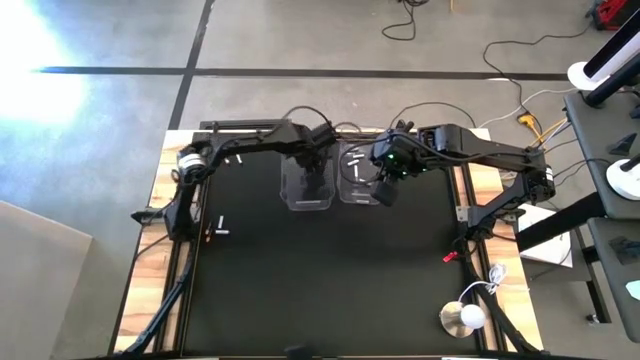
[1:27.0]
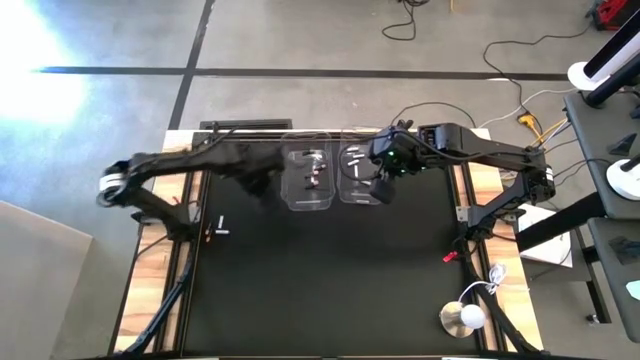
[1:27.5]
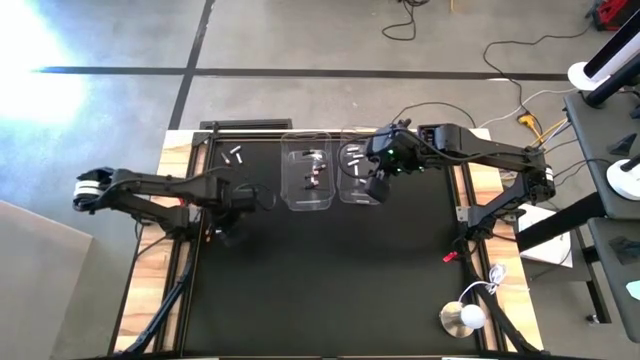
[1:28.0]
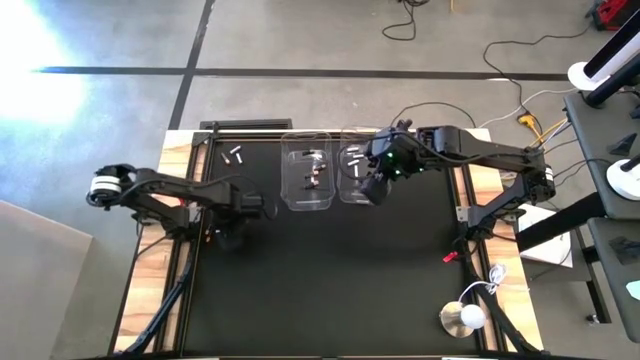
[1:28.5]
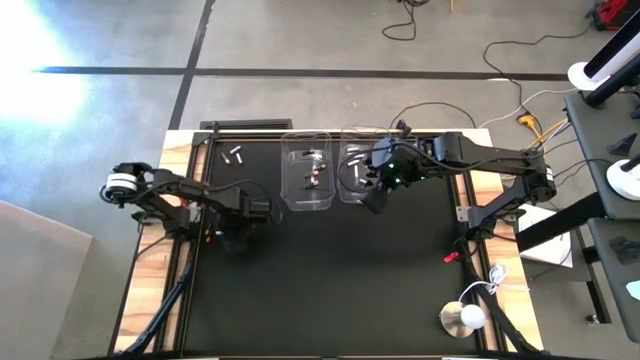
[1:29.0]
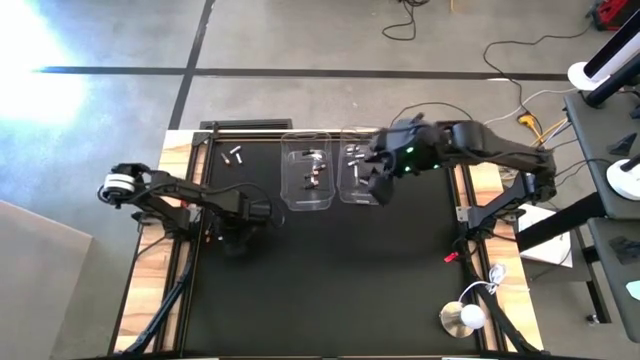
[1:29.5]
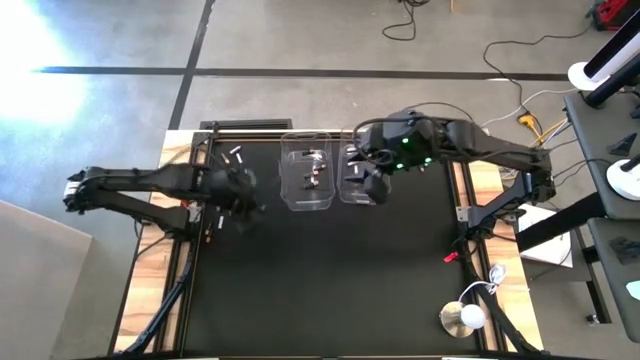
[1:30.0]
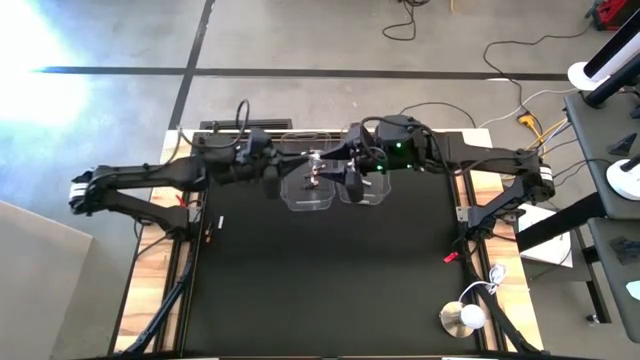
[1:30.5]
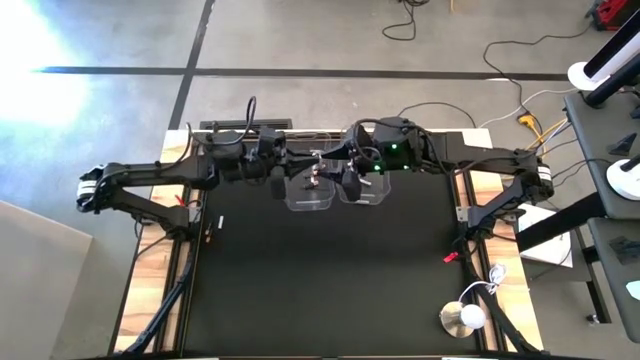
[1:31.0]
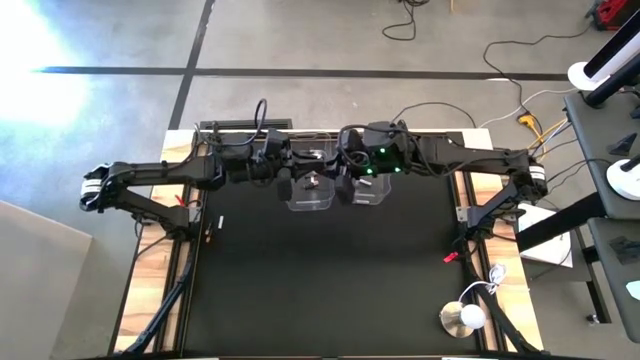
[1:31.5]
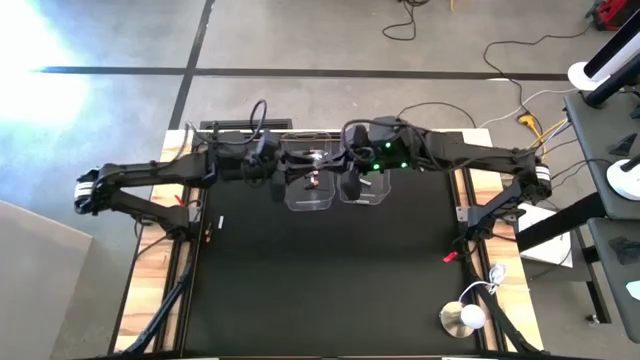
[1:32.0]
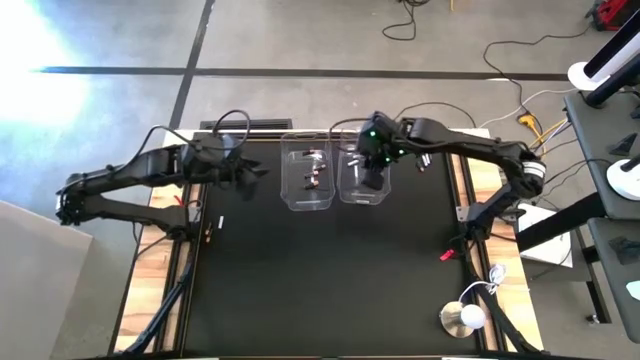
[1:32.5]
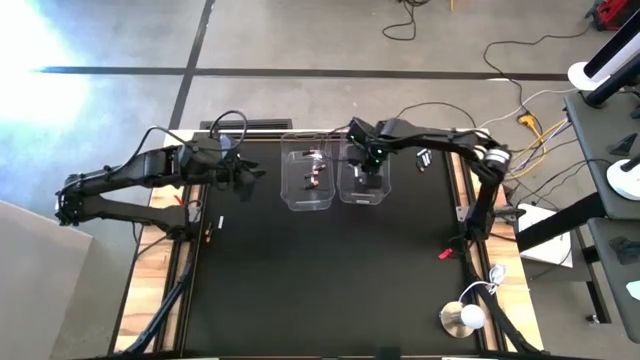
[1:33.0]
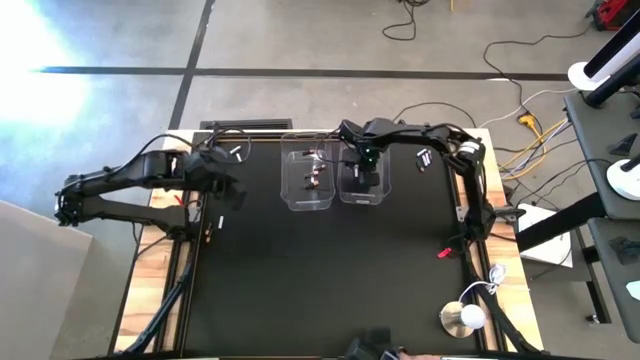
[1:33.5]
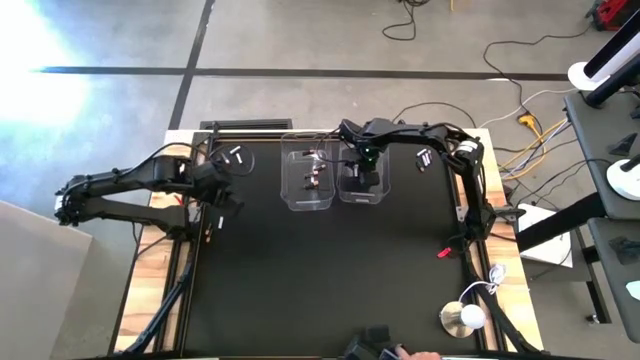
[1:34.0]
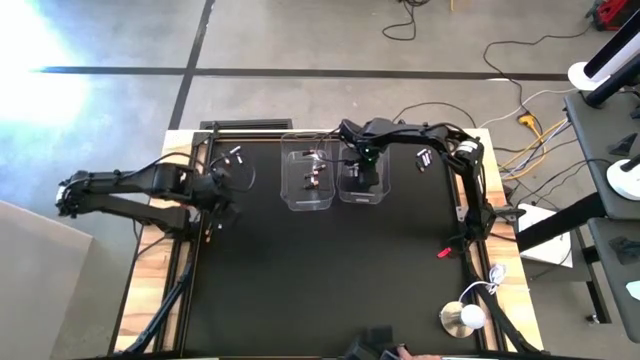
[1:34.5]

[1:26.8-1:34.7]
Task: Sort batteries
Put the white battery into the right transparent bin

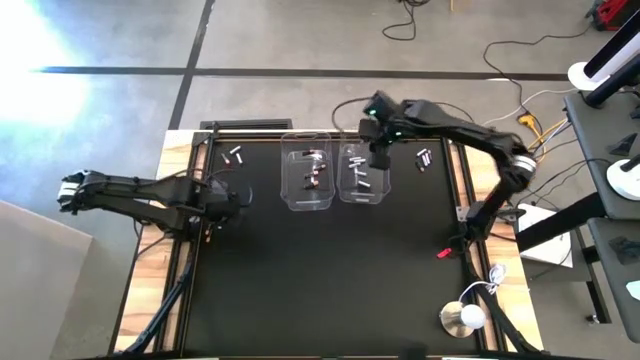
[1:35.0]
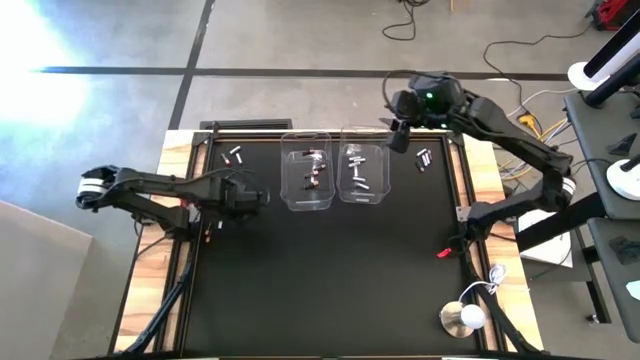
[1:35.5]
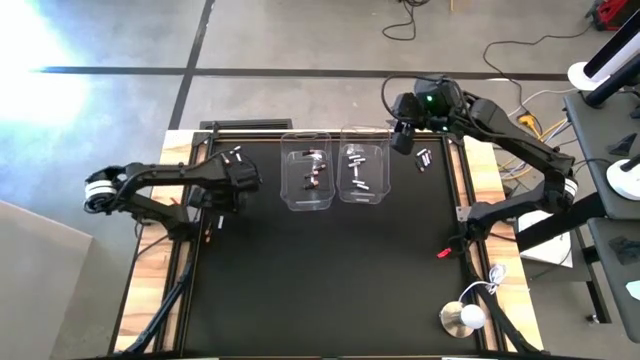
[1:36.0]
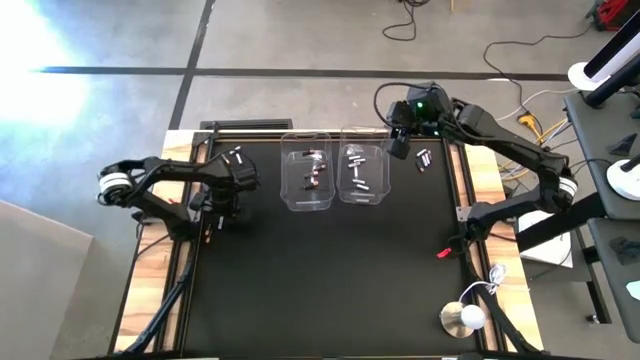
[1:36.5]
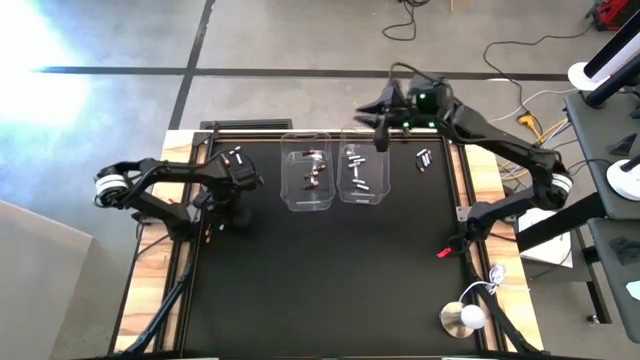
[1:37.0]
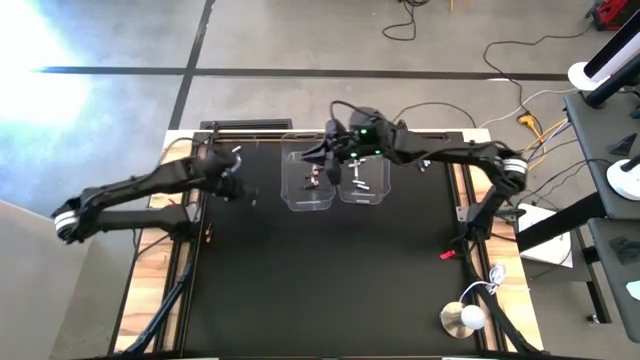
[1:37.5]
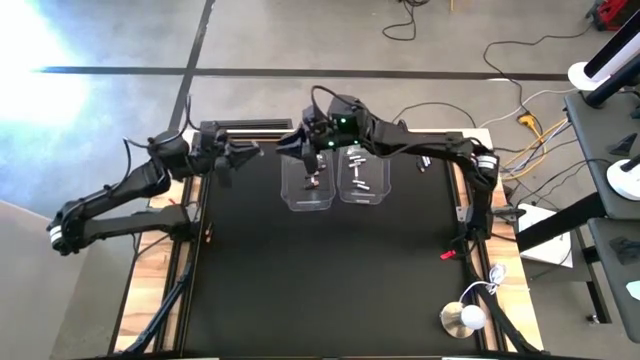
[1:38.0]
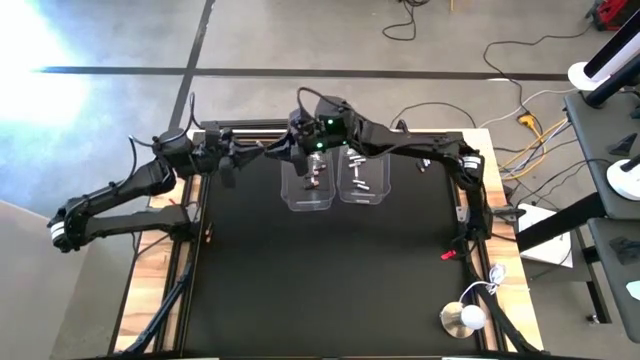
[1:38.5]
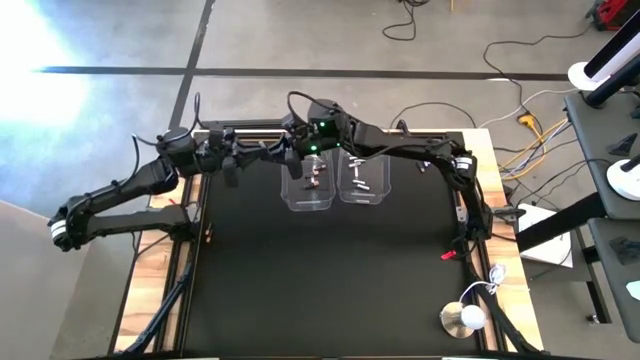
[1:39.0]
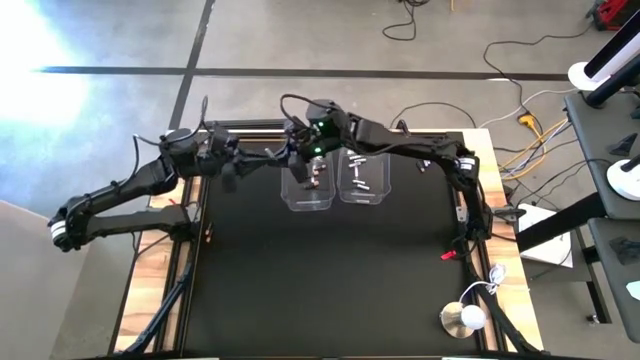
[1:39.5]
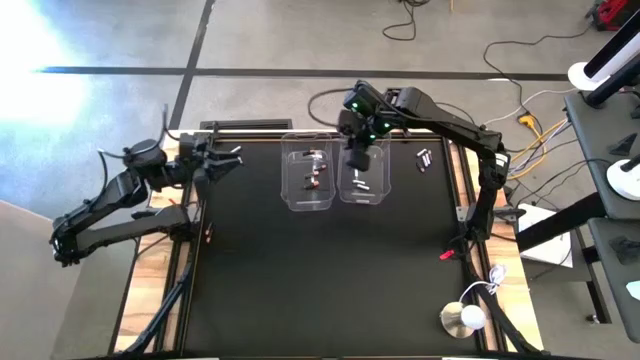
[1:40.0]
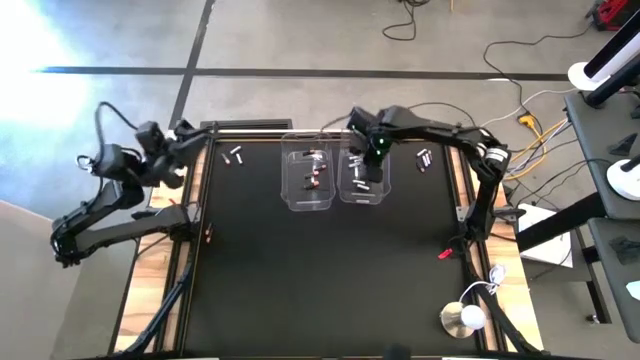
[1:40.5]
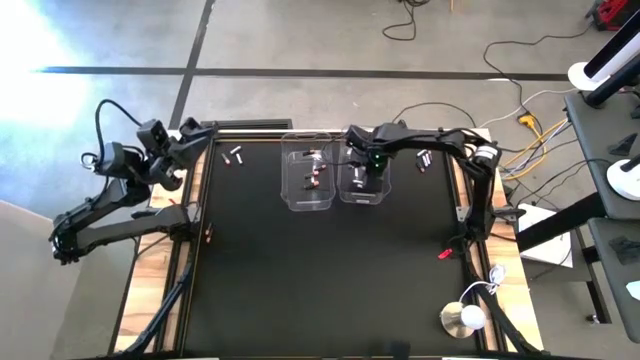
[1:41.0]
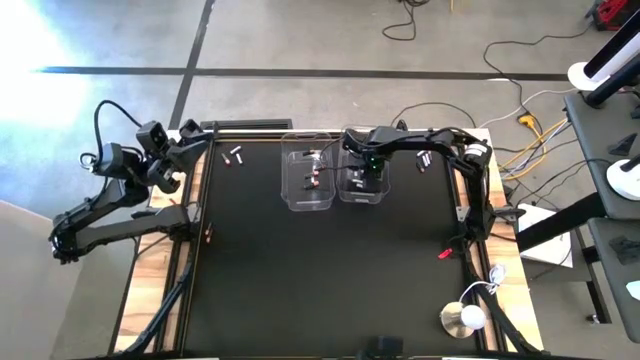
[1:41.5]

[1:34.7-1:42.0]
Put the white battery into the right transparent bin

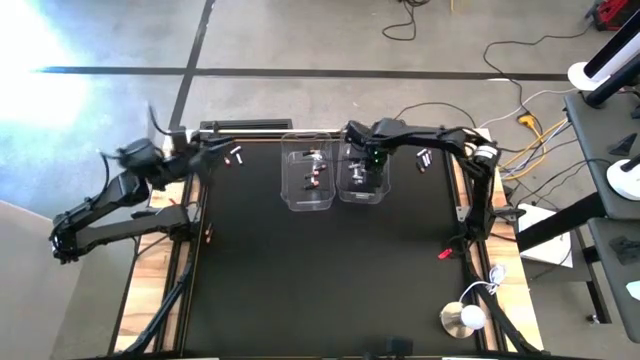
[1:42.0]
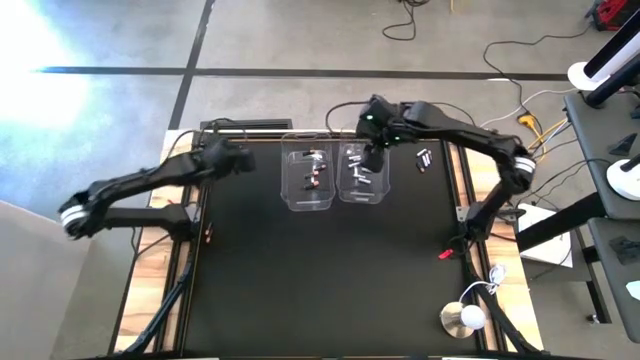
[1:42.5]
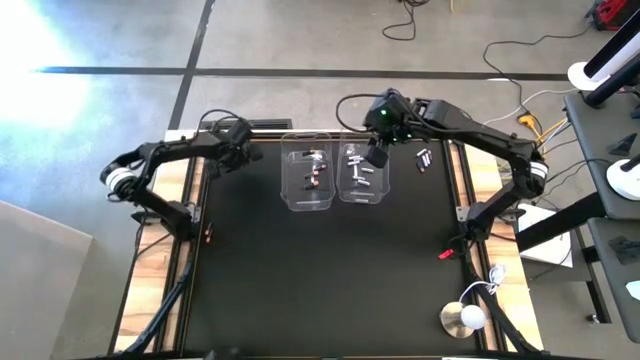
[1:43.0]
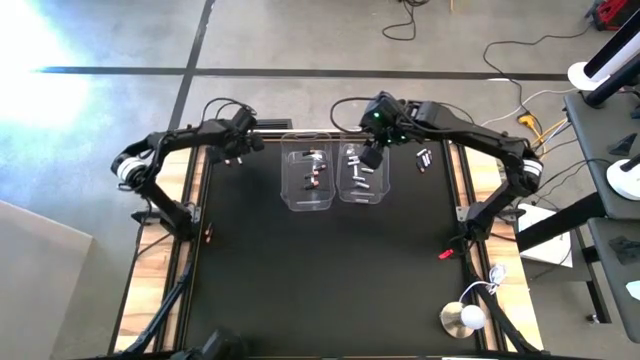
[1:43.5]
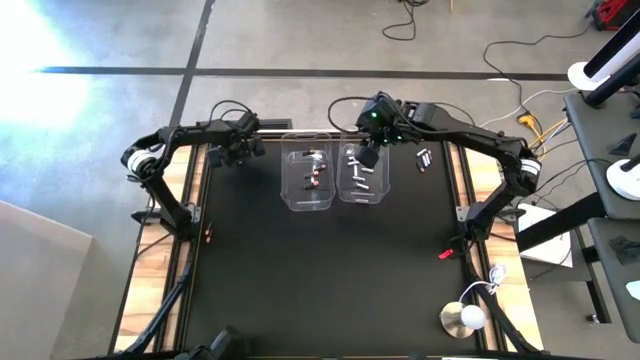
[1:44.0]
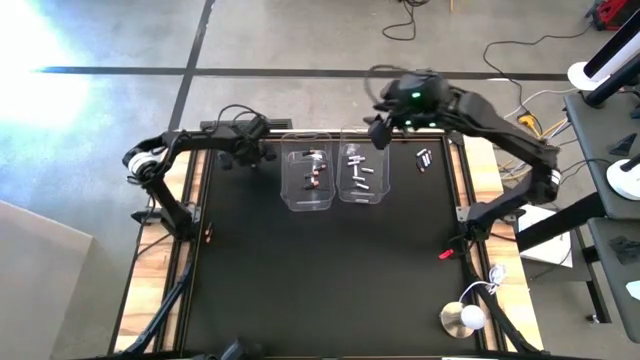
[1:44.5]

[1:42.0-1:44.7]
Put the white battery into the right transparent bin

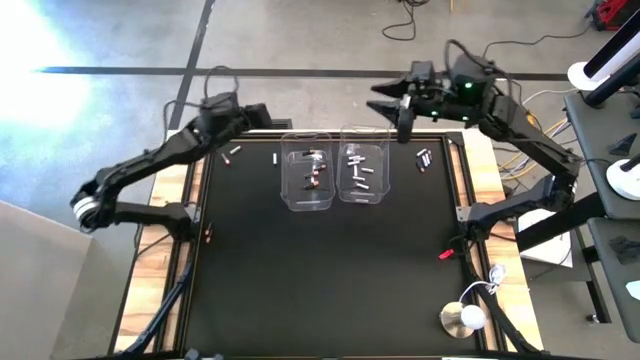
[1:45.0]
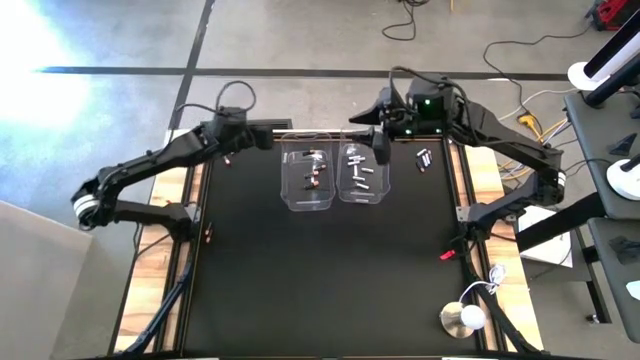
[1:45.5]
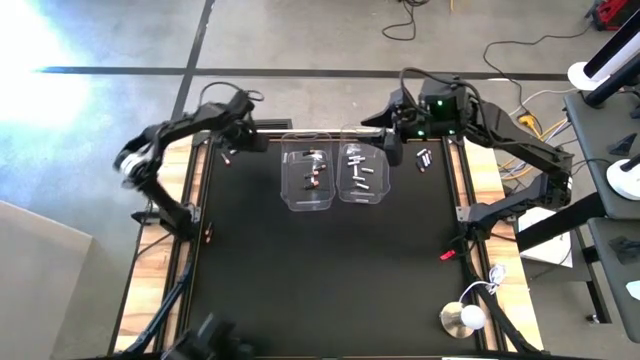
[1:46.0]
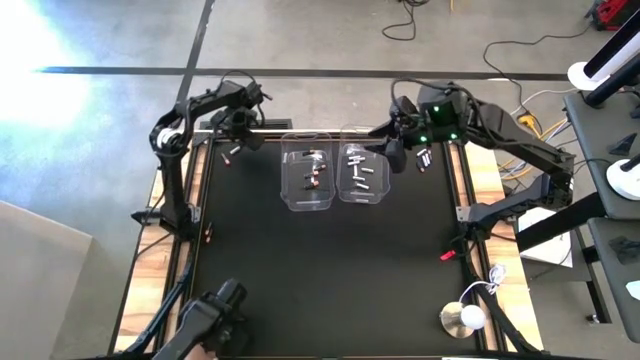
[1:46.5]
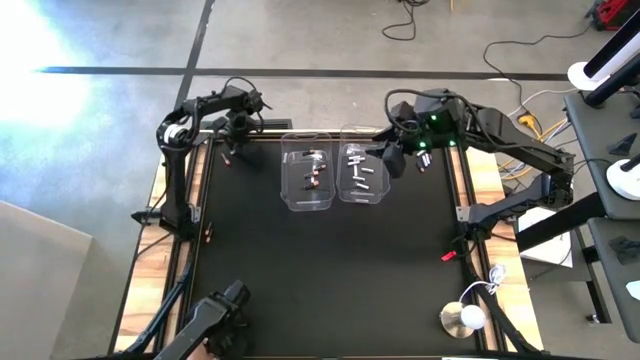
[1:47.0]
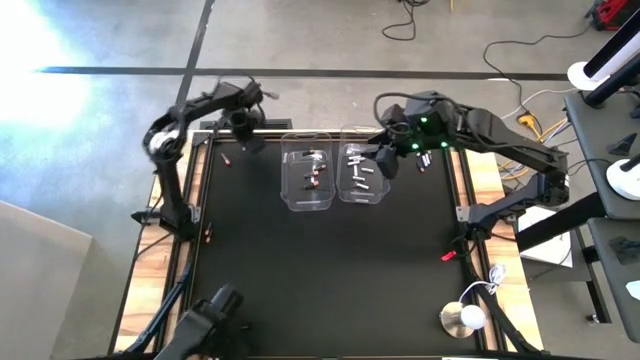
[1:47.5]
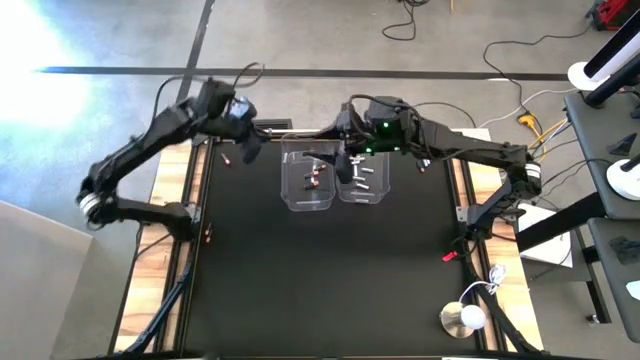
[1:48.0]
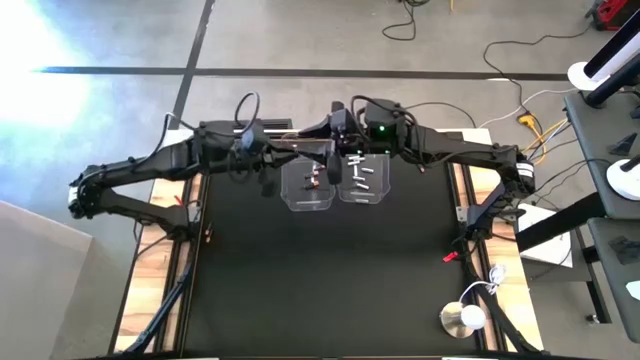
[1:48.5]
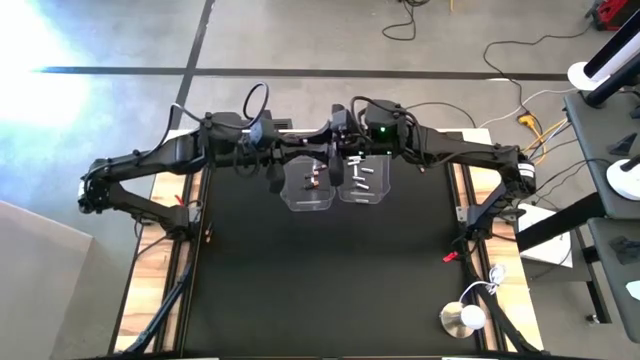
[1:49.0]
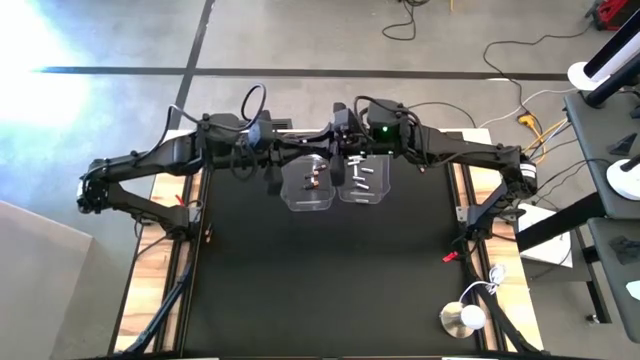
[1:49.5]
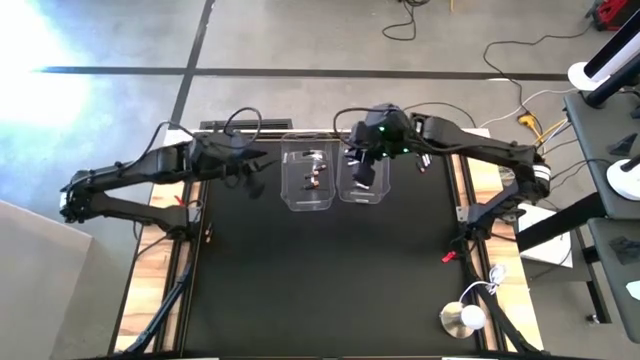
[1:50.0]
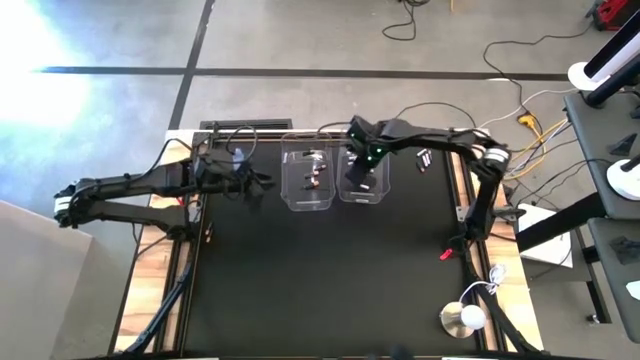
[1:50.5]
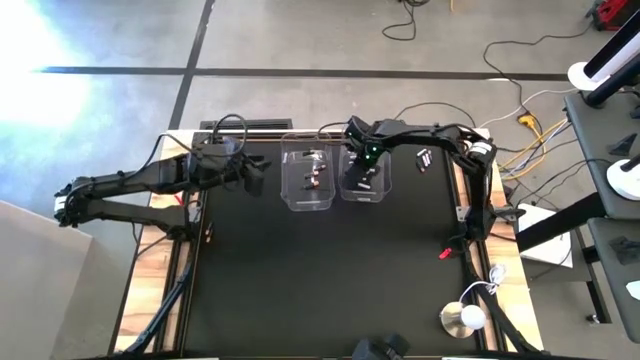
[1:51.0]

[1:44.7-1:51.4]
Put the white battery into the right transparent bin
